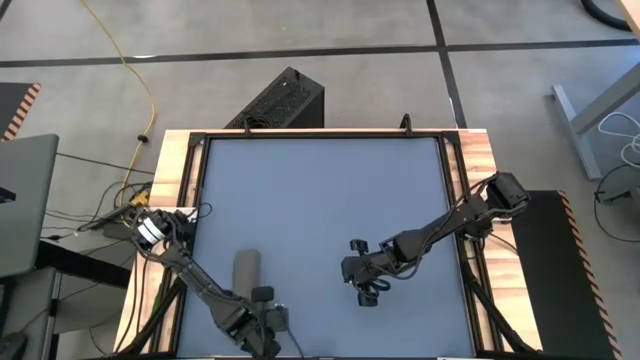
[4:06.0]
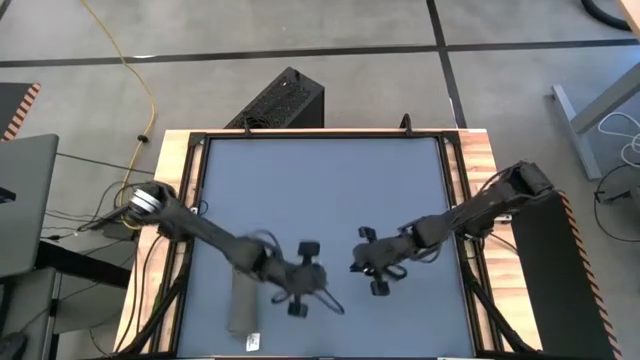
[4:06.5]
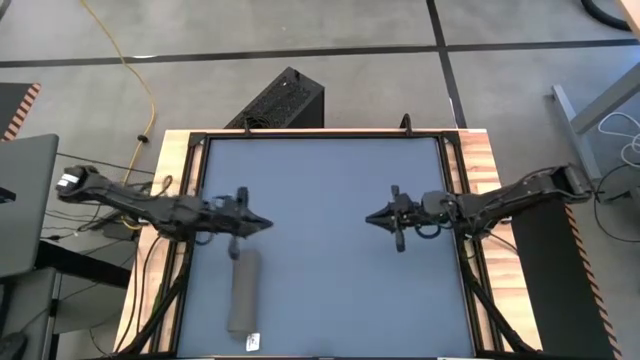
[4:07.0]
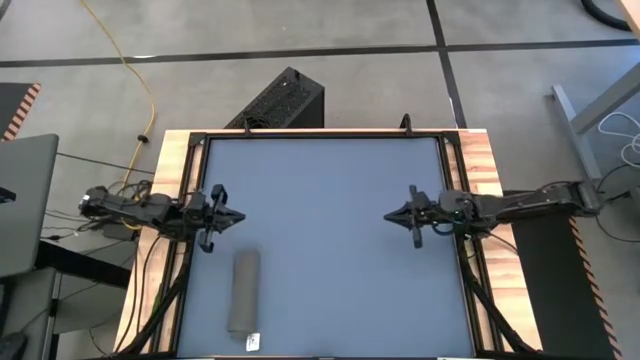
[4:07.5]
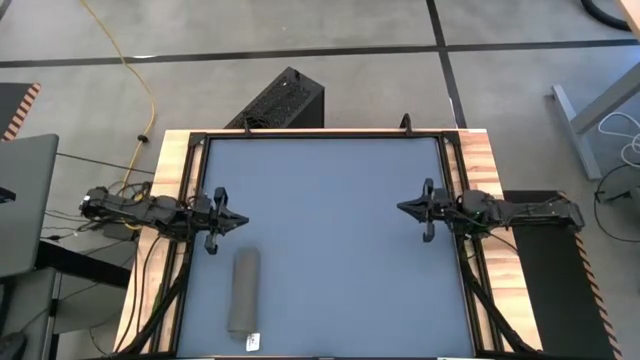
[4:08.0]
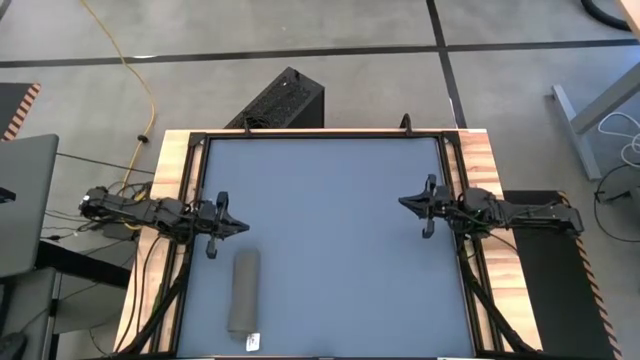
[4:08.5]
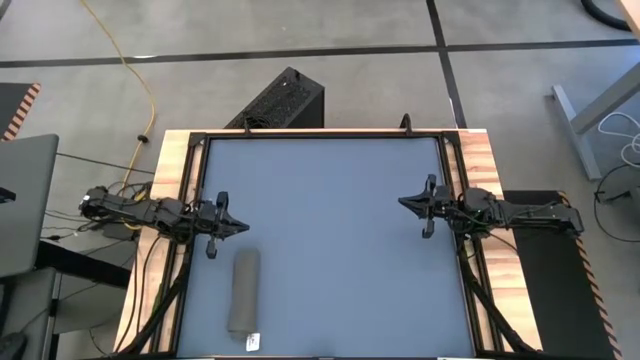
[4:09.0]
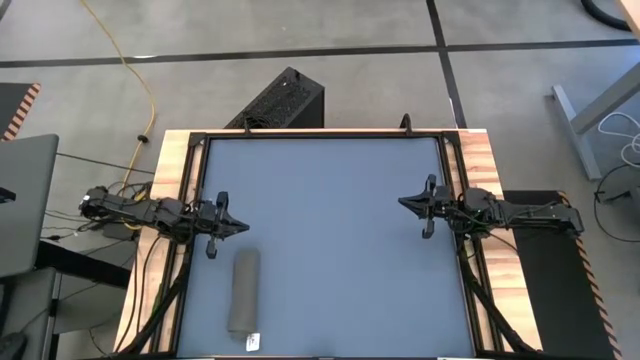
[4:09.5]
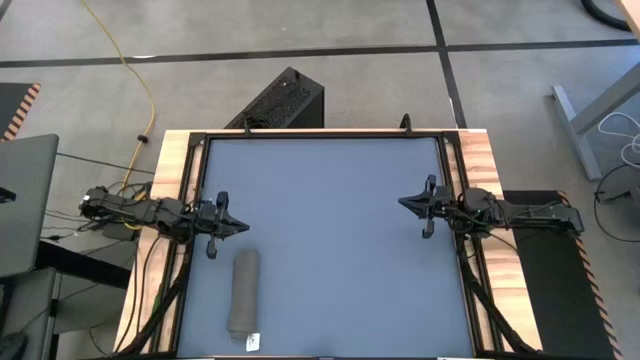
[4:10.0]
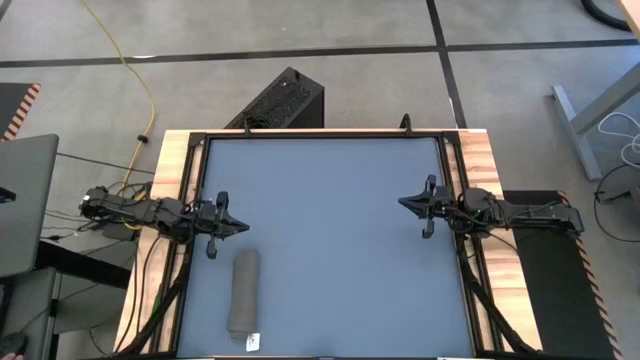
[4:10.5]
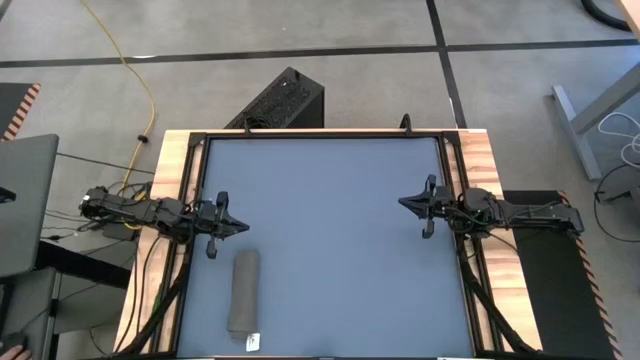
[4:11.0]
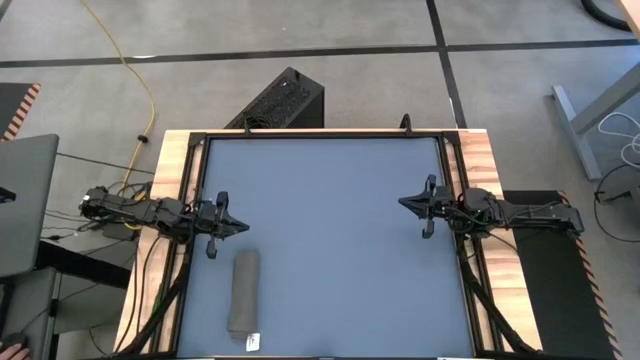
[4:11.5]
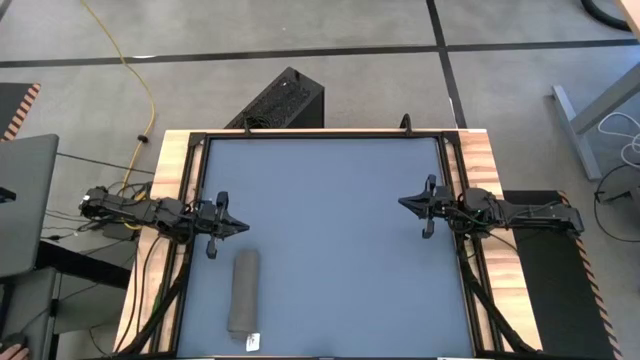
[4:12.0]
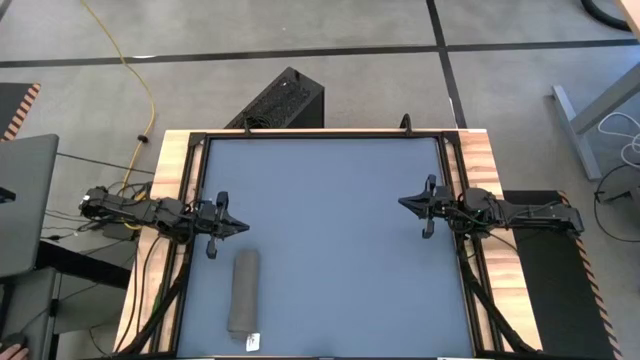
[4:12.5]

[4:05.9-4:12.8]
Task: Roll towel into tight, uniform cylinder
Return to Home Position

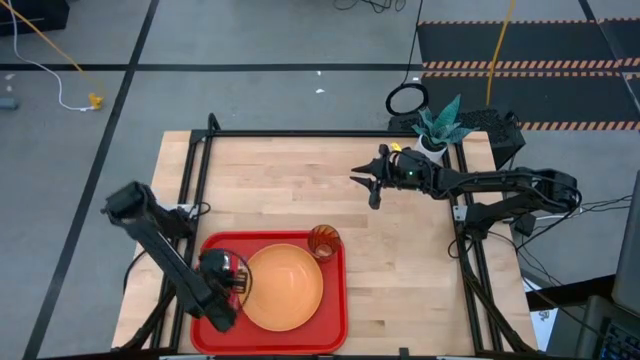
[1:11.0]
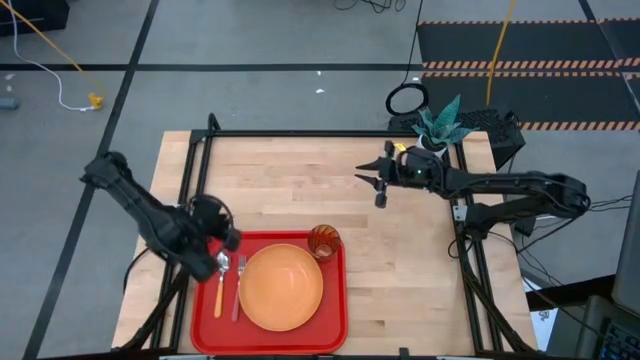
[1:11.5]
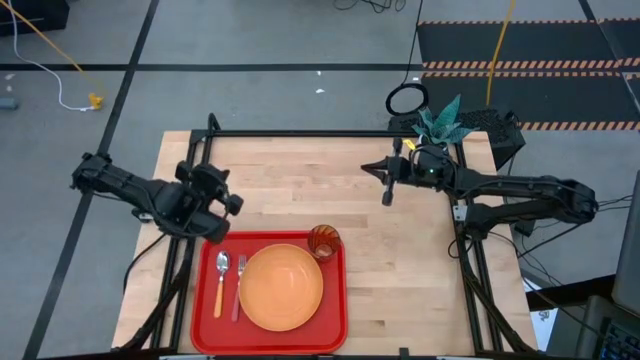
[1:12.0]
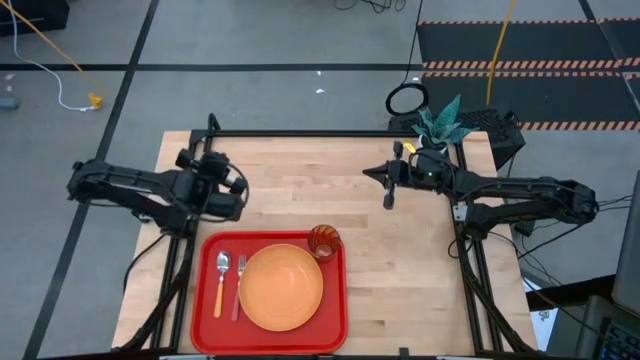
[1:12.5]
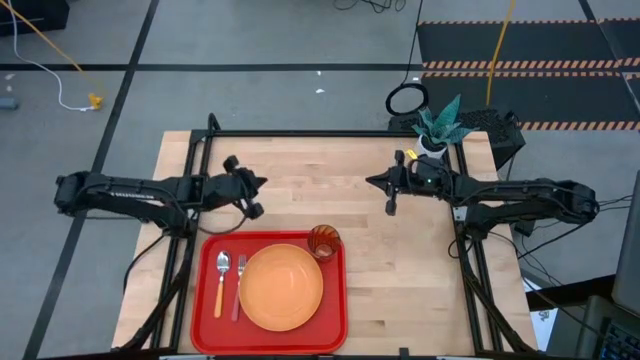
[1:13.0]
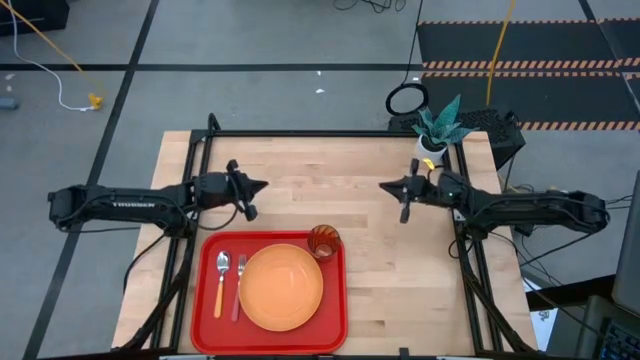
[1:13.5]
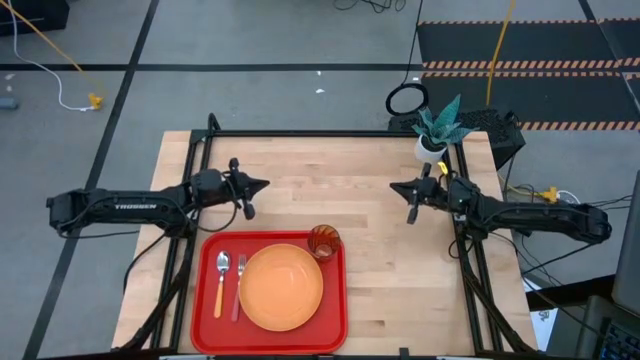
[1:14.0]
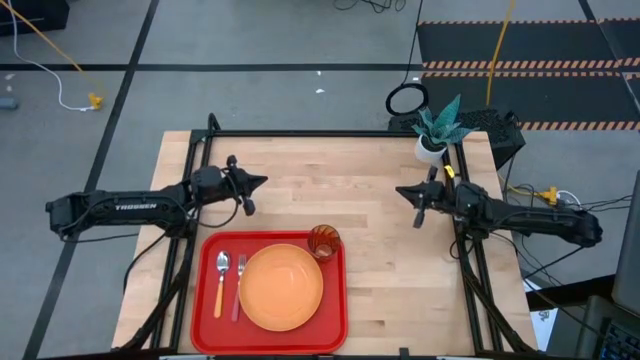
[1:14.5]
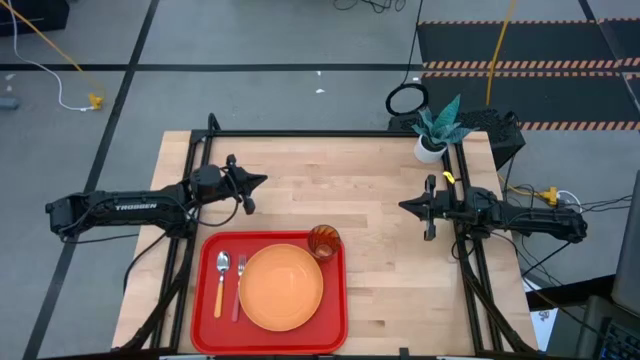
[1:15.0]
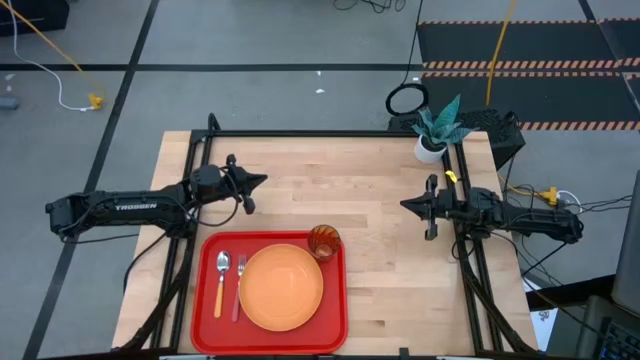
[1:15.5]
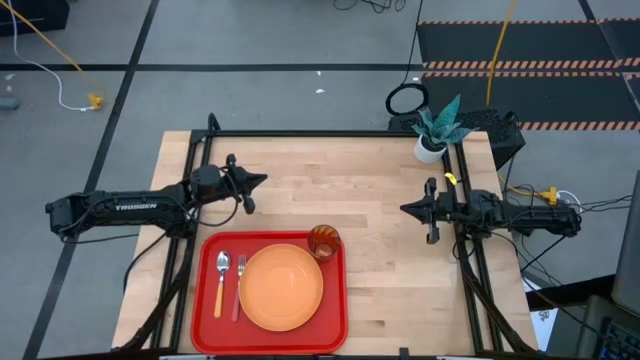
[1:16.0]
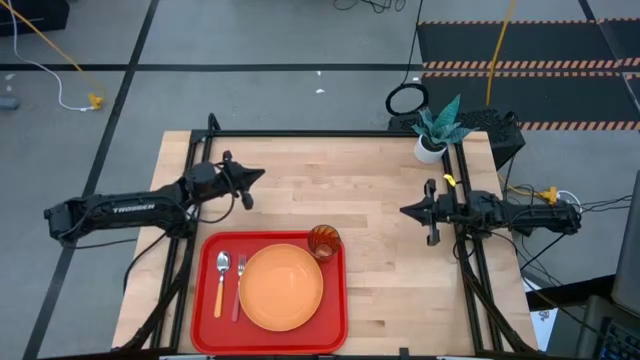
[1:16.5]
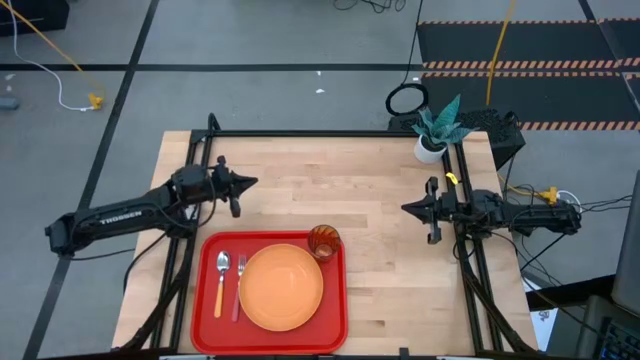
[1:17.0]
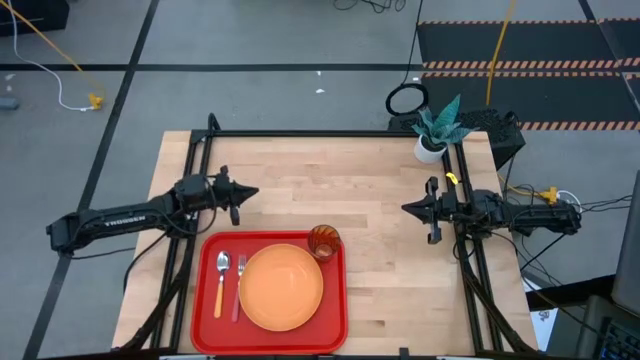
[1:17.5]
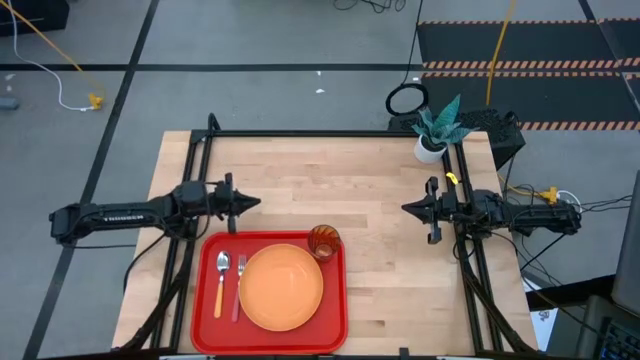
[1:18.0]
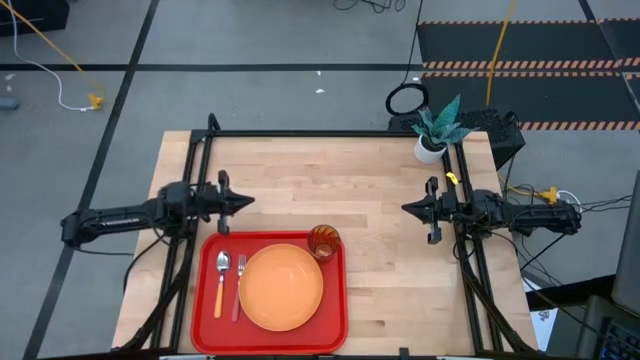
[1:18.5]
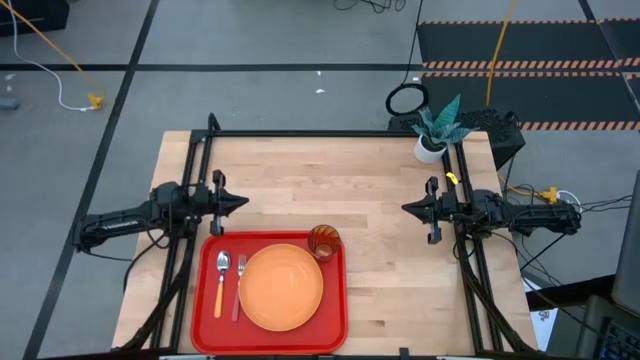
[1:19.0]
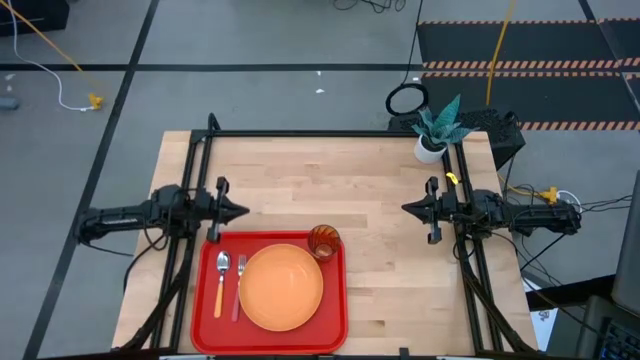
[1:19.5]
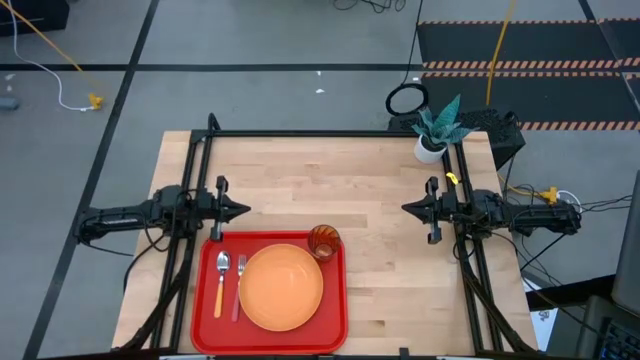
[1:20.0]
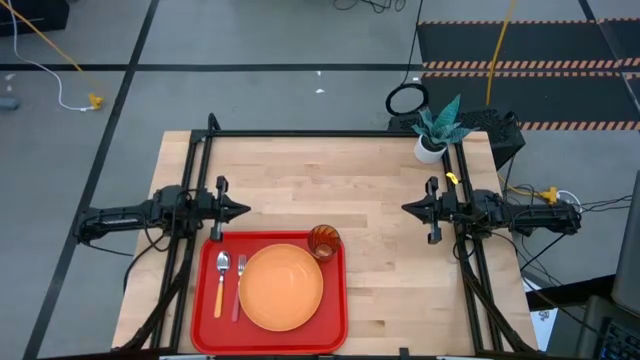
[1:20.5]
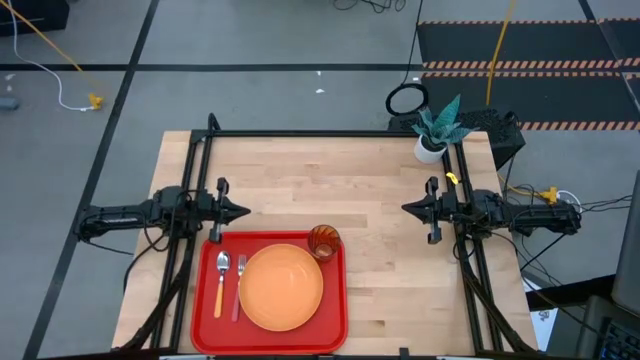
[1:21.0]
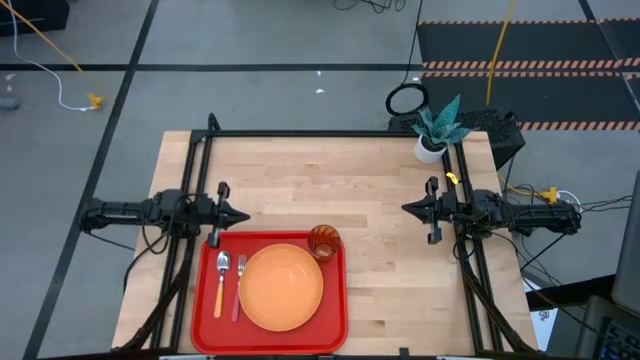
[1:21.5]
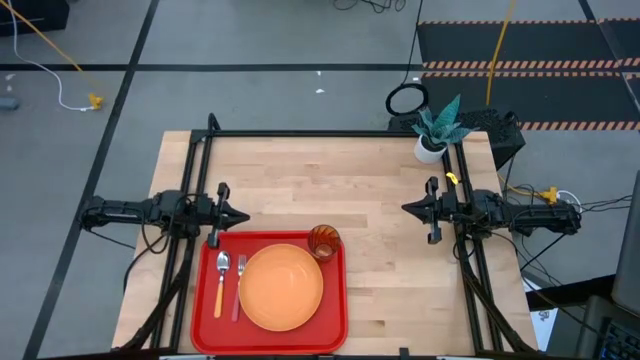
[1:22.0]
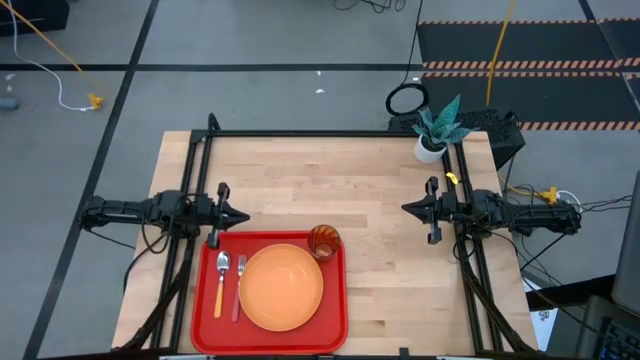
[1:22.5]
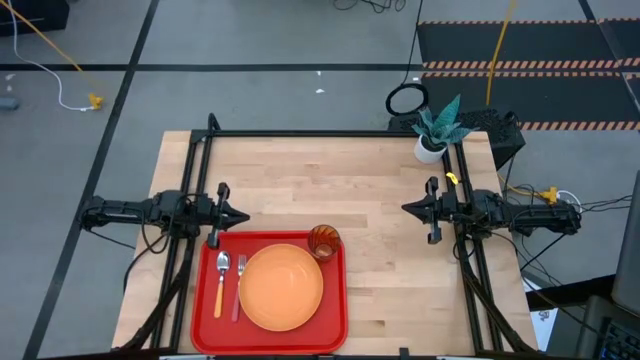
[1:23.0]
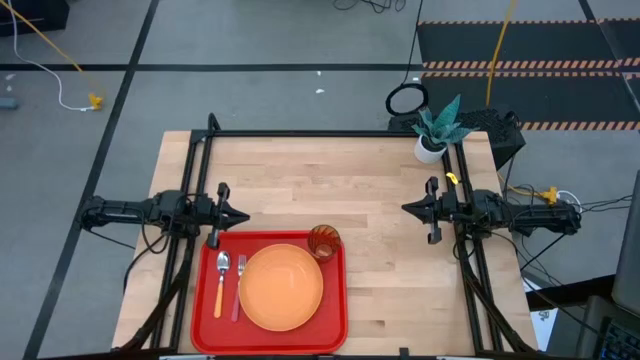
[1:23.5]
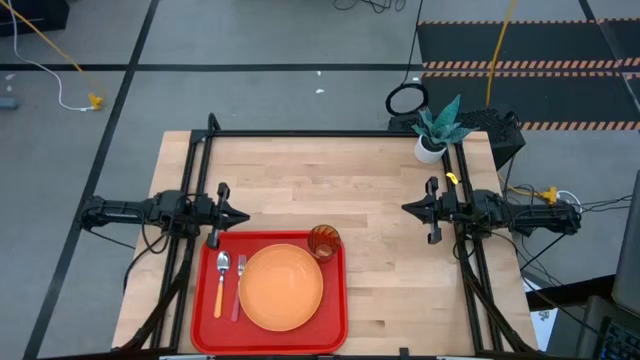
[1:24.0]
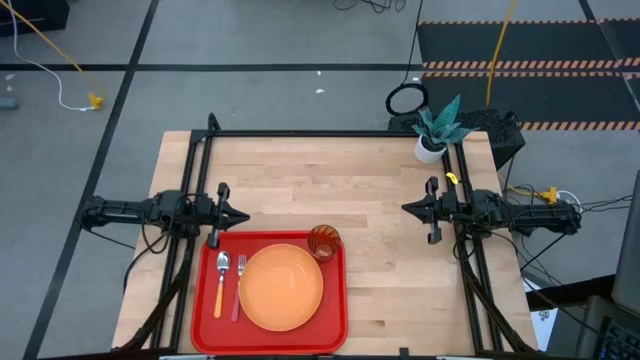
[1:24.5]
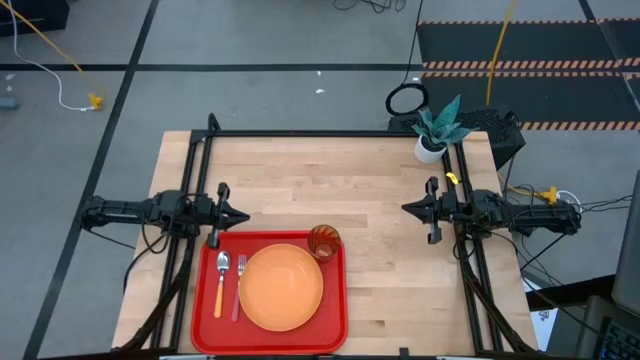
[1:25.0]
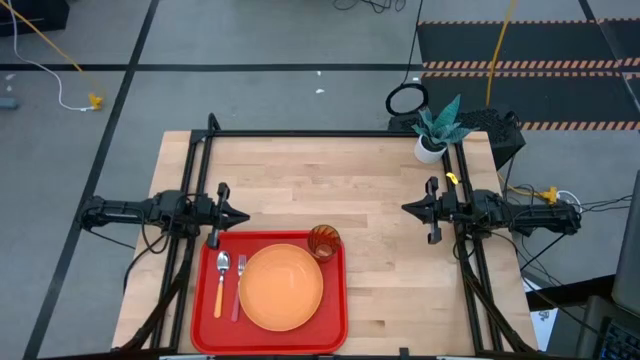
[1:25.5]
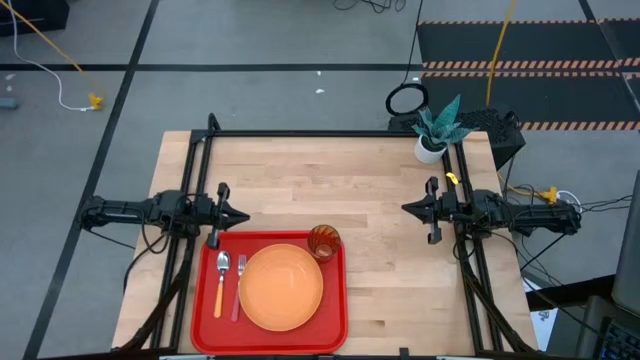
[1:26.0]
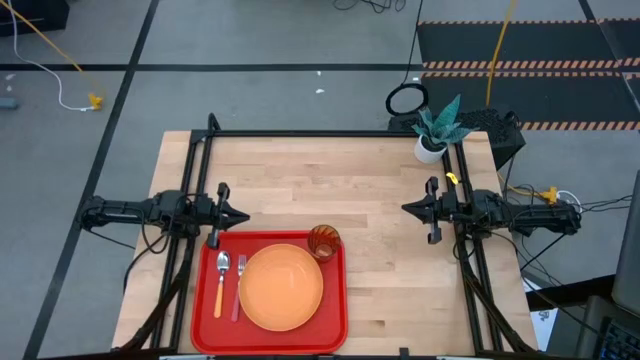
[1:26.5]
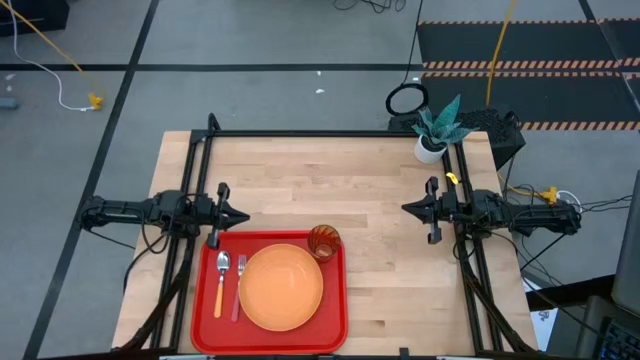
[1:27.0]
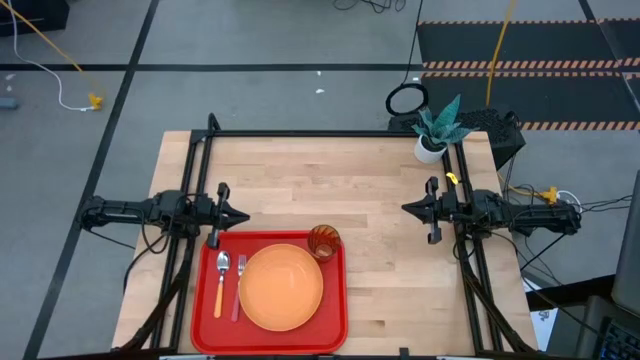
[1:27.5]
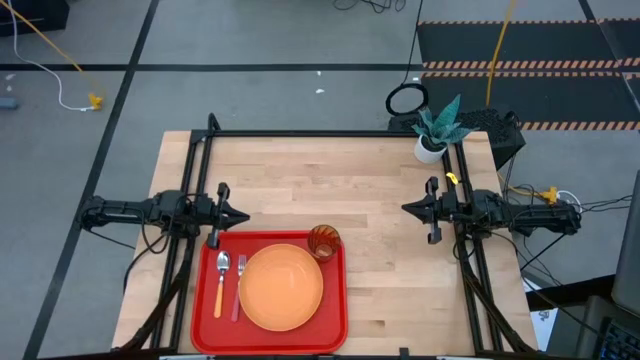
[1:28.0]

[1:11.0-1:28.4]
Task: Pick and place plate/cup/fork/spoon on tray
Return to Home Position
